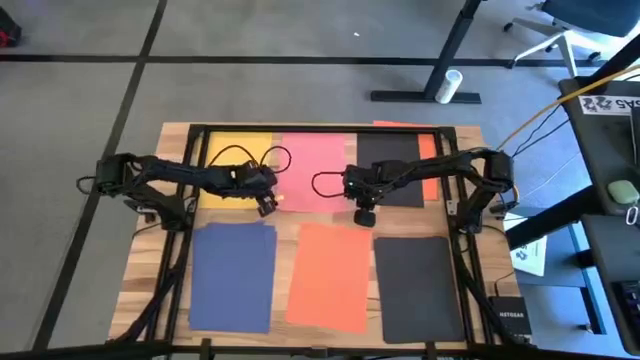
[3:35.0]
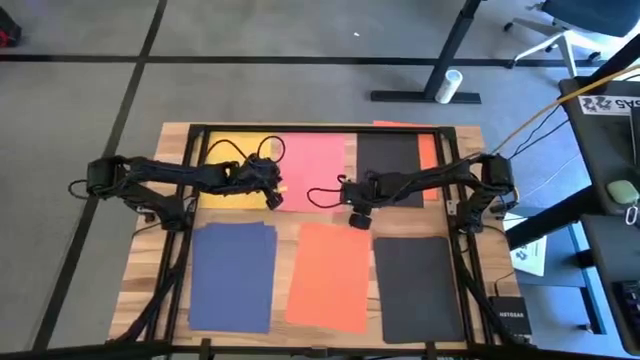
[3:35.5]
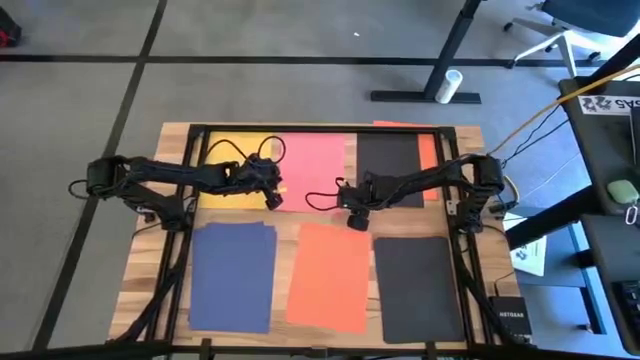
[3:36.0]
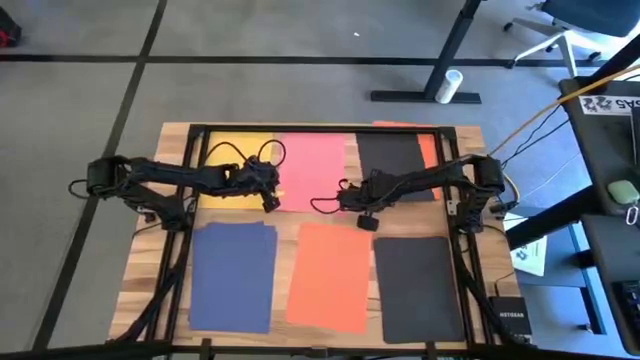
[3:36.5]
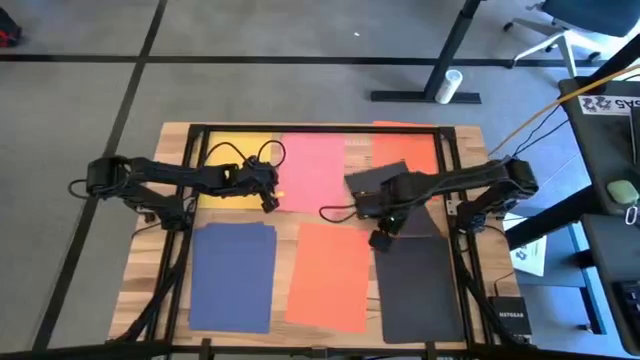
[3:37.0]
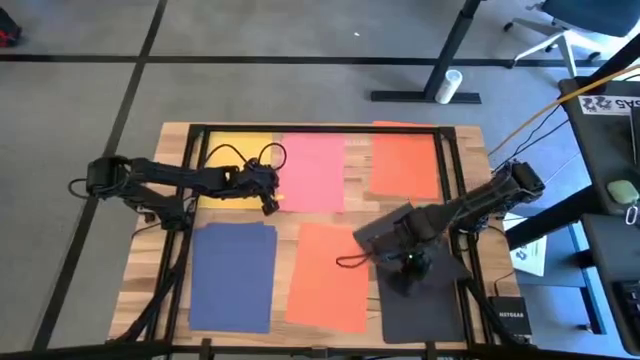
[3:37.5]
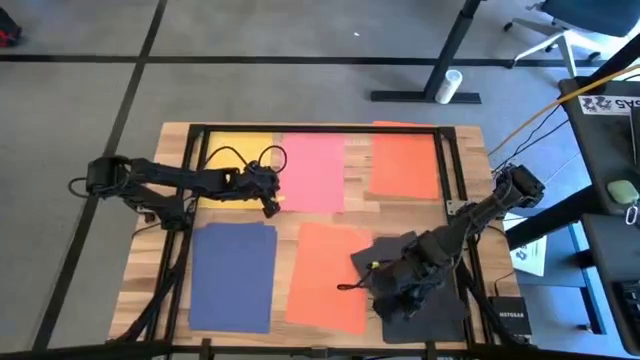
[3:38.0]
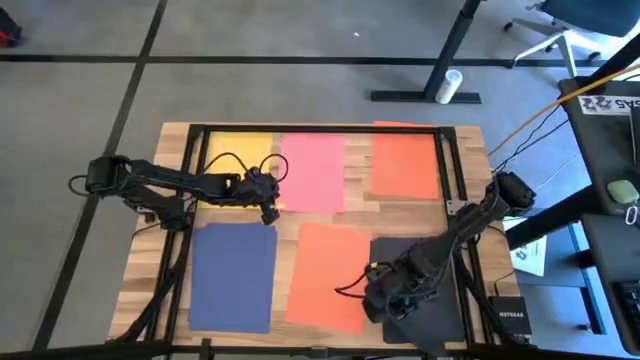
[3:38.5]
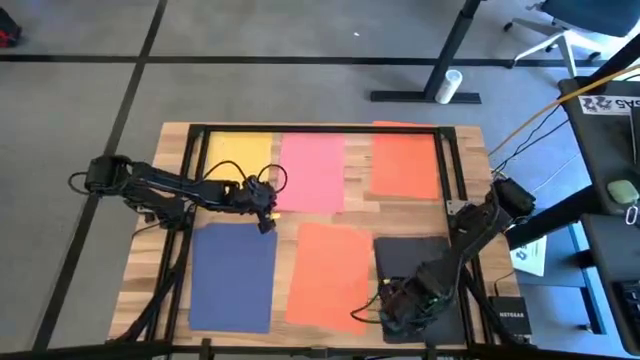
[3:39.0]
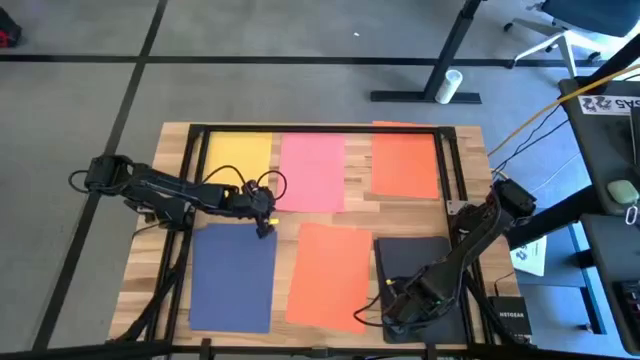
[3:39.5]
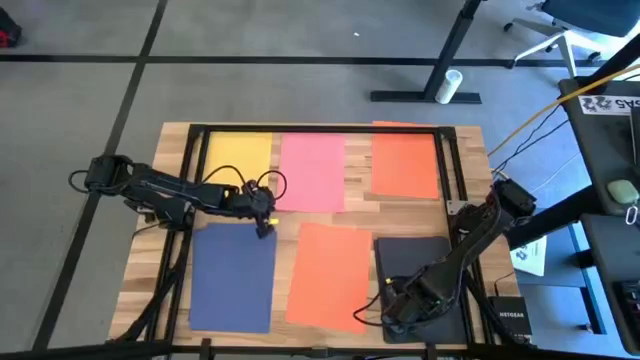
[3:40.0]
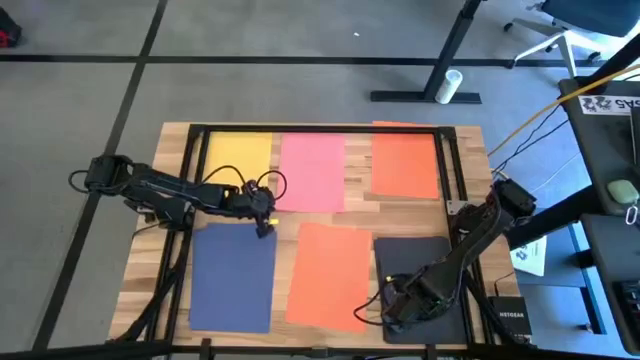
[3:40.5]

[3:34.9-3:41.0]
Task: Organize paper
Stack the black paper on top of the stacked black papers

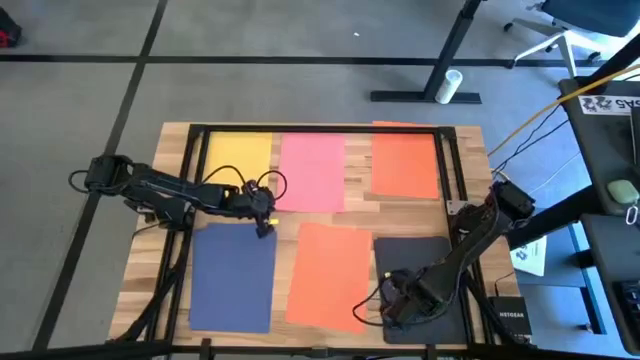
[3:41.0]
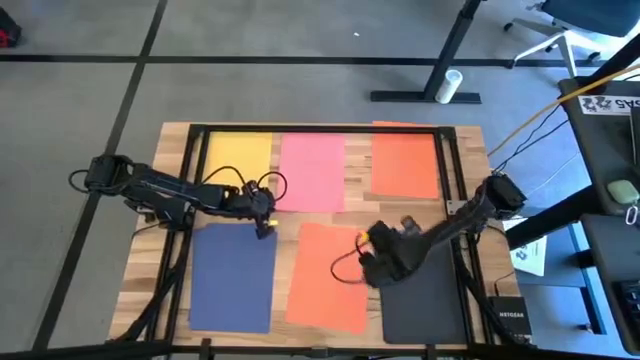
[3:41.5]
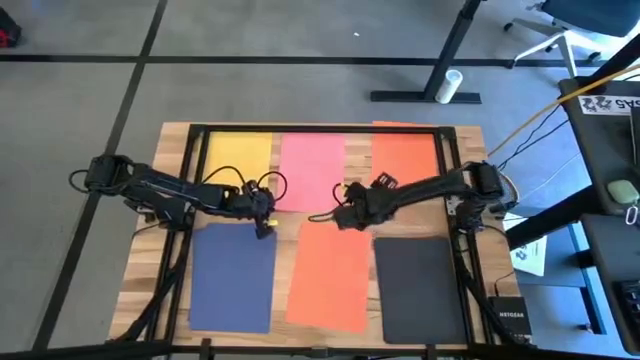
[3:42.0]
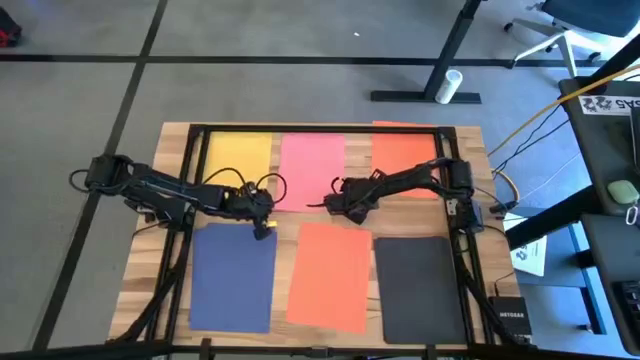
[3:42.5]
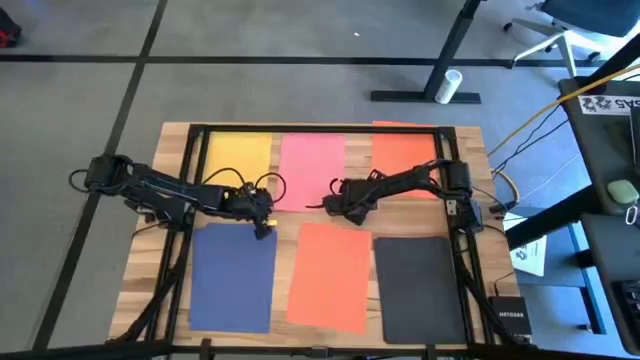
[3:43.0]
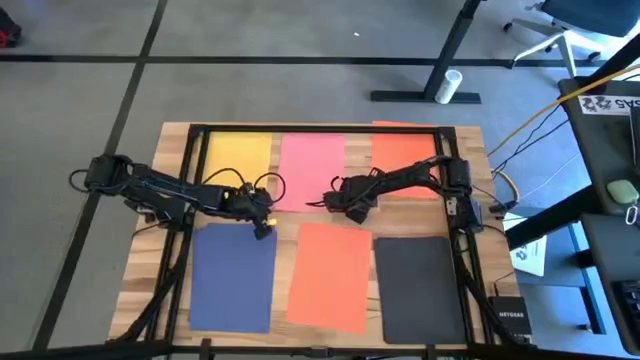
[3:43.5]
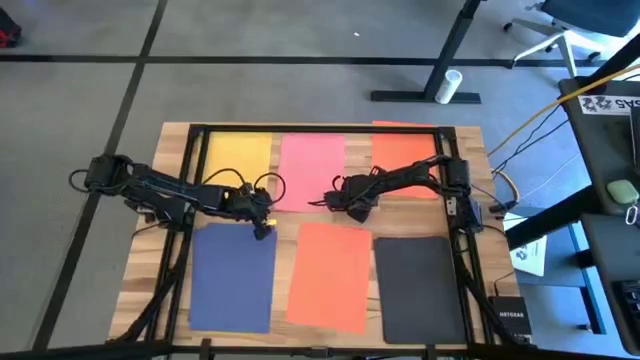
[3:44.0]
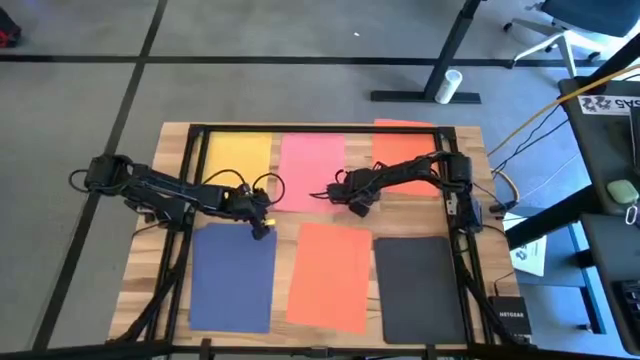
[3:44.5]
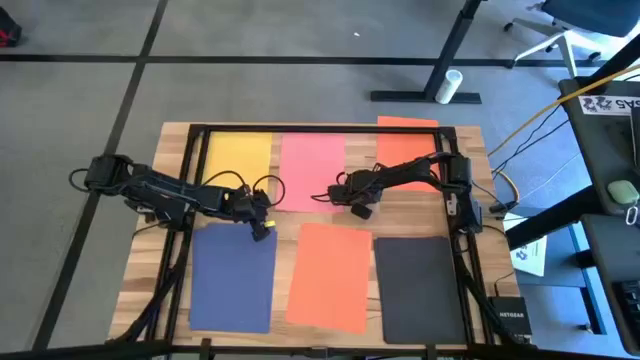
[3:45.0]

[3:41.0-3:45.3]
Stack the orange paper on top of the stacked orange papers

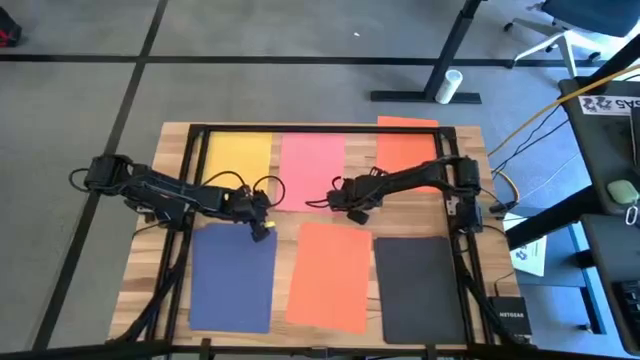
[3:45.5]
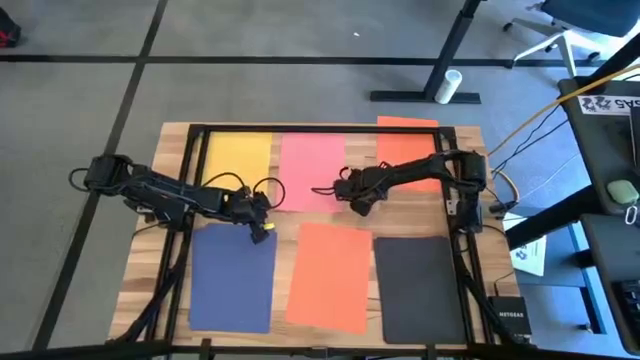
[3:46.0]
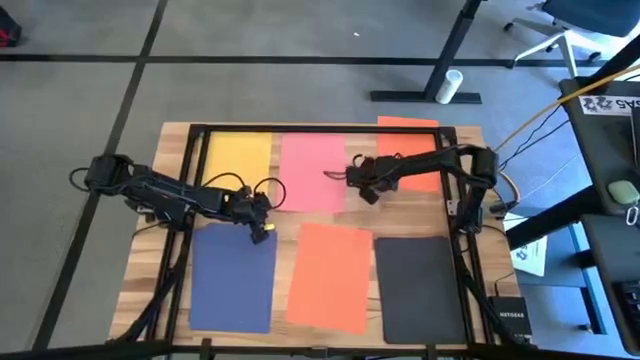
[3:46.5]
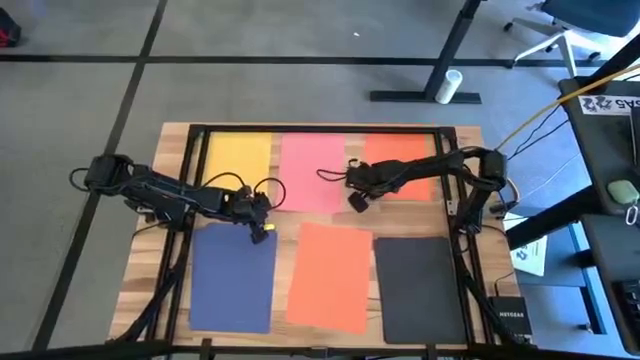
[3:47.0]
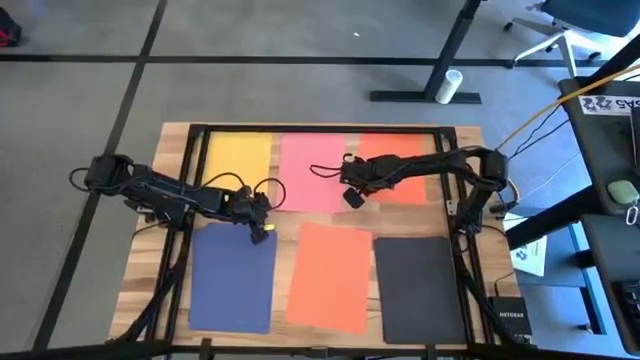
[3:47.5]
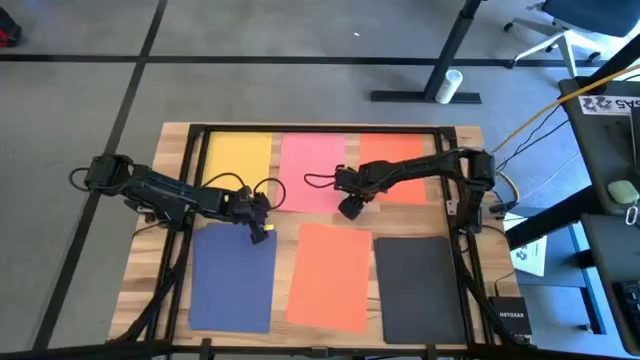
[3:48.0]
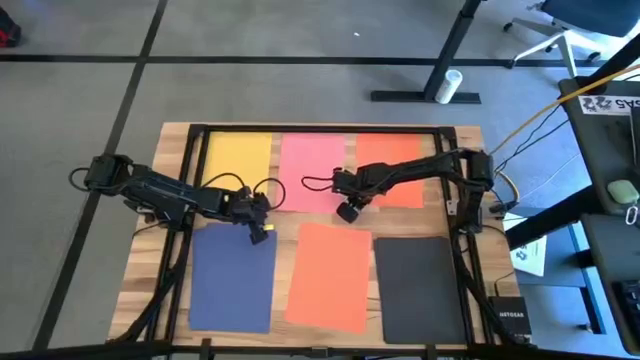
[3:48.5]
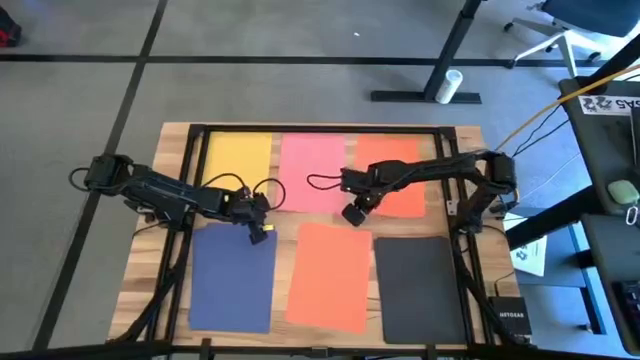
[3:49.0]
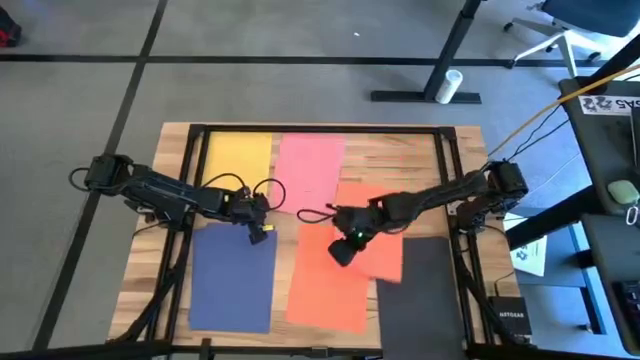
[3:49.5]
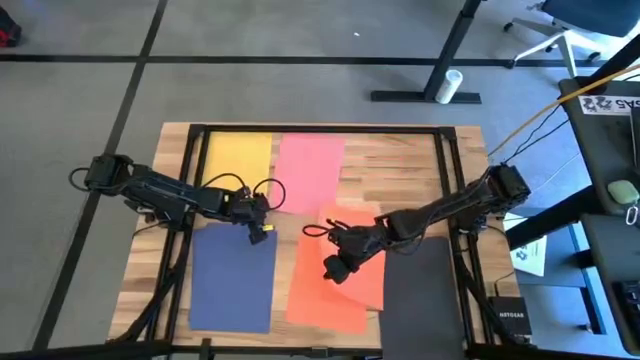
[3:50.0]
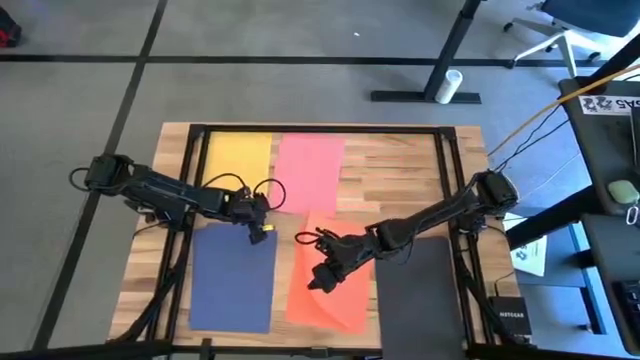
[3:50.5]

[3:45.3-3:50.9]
Stack the orange paper on top of the stacked orange papers

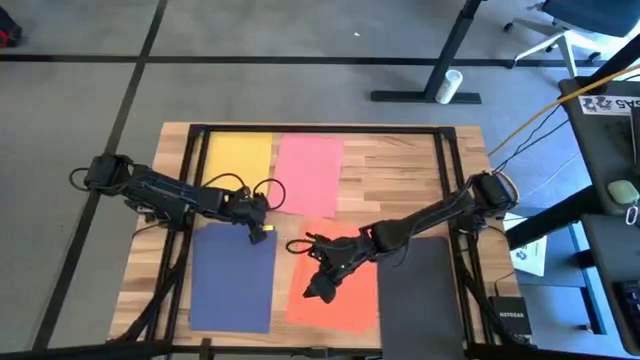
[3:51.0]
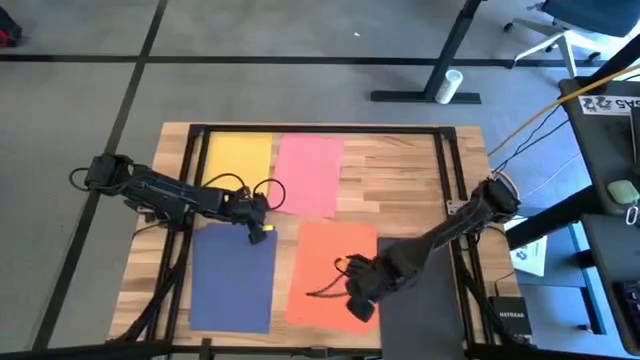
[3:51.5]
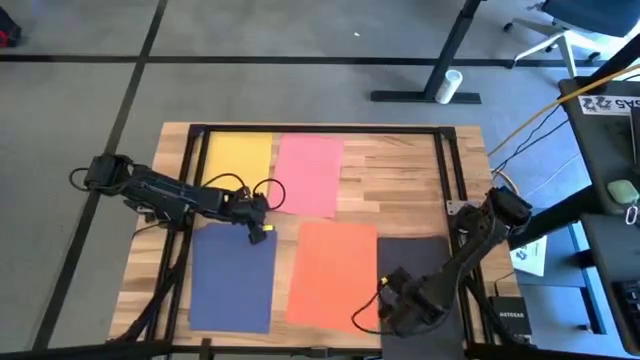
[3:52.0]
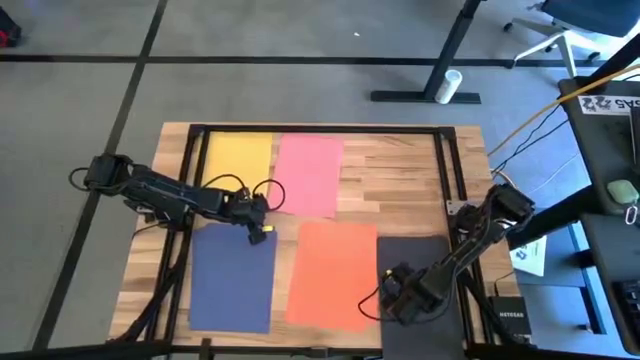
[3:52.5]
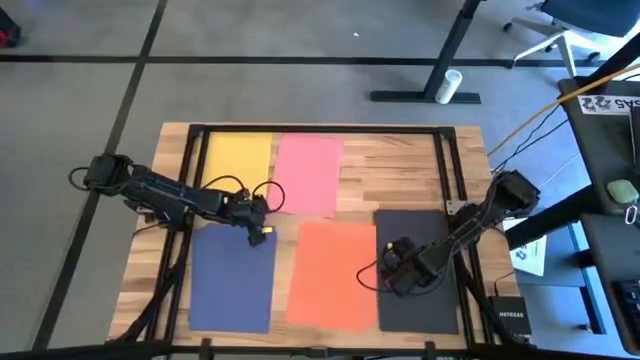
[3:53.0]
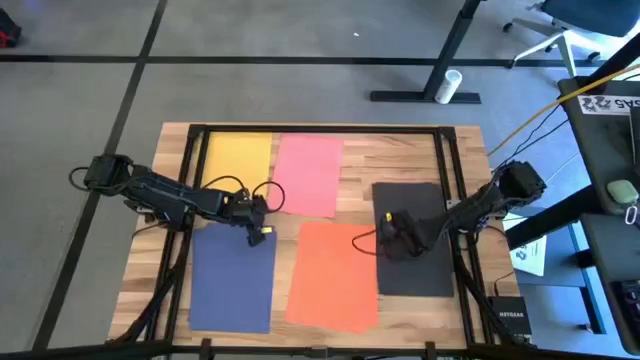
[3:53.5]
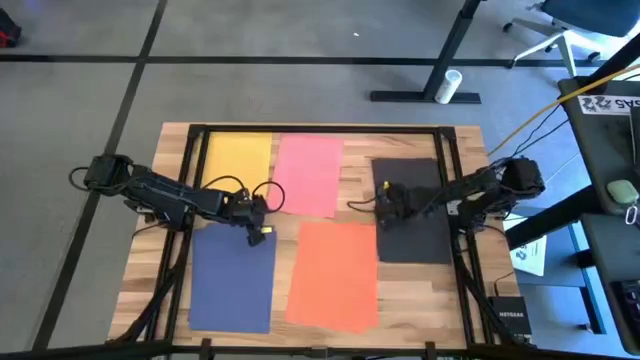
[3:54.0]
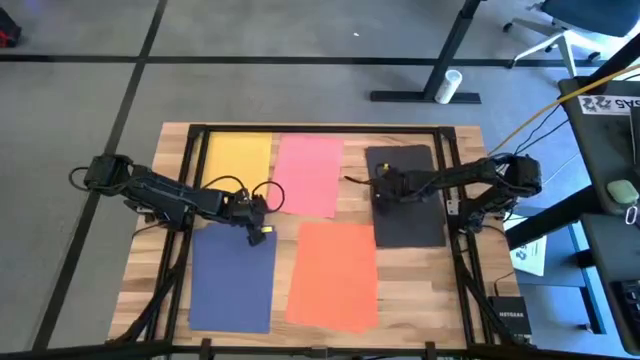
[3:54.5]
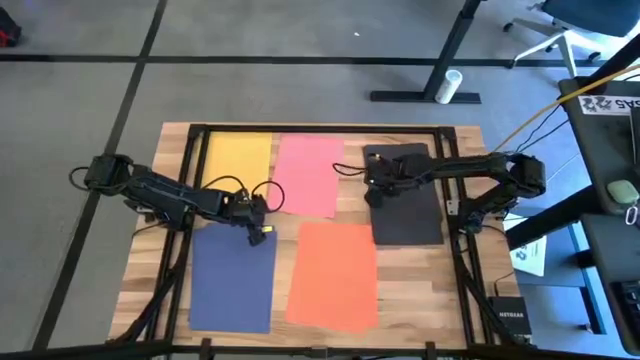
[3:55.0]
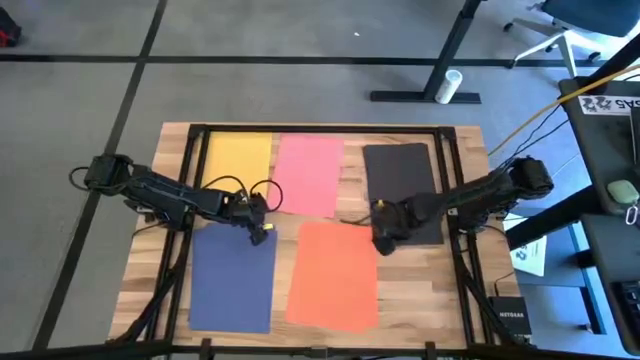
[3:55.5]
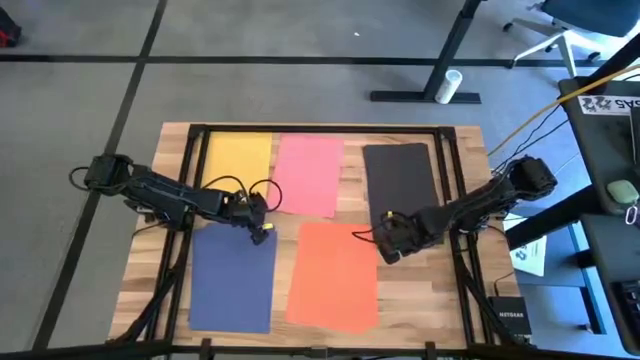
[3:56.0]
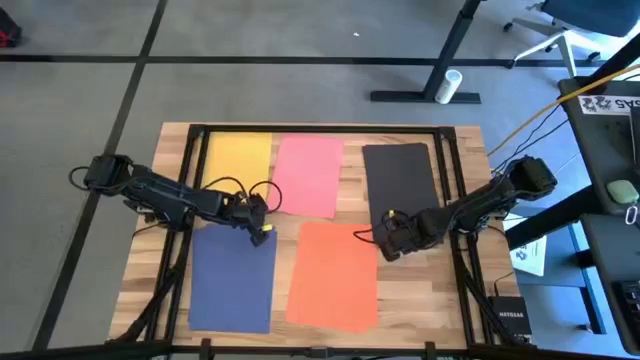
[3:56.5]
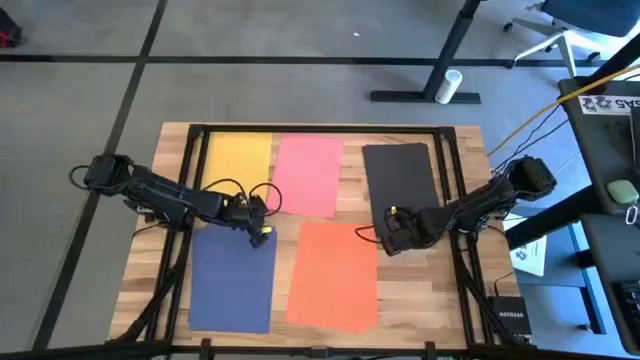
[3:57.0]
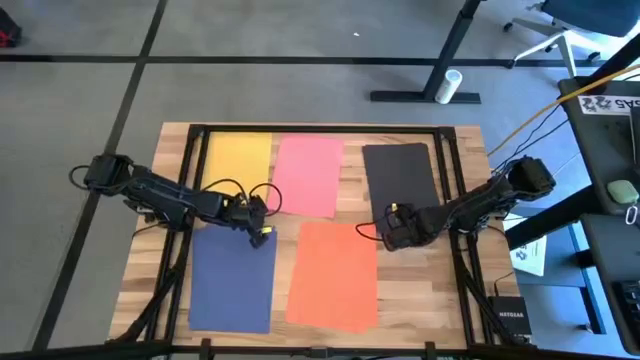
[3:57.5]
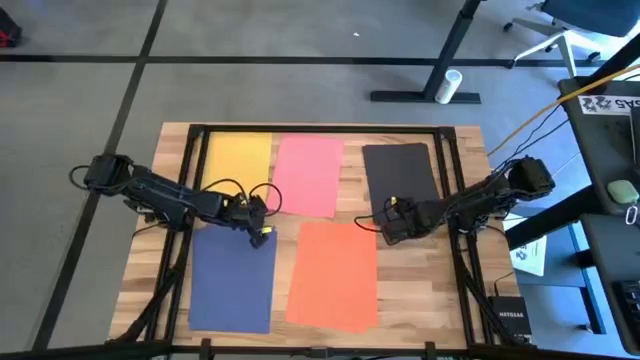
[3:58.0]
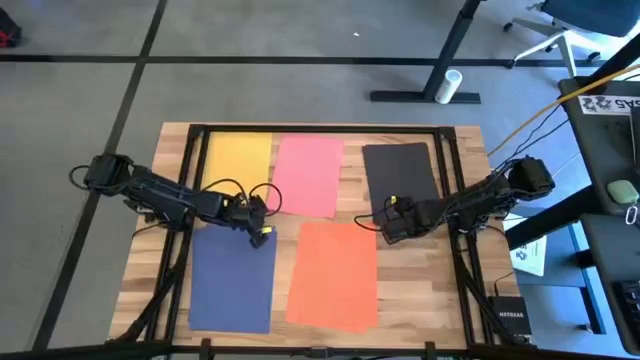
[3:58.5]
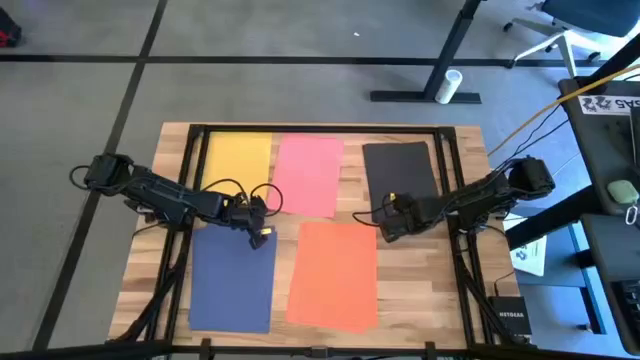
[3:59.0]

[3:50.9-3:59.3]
Move the stacked black papers to the top right of the table
